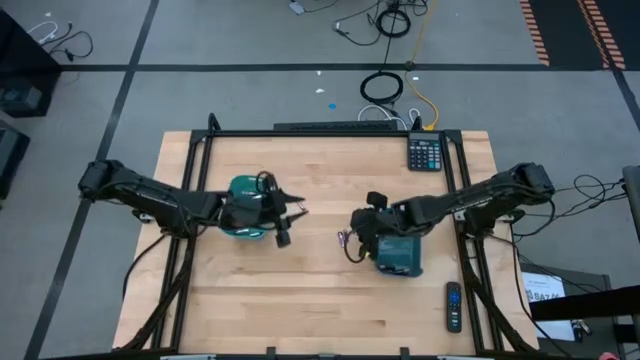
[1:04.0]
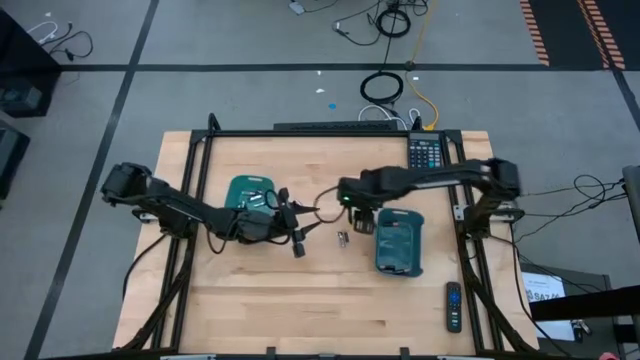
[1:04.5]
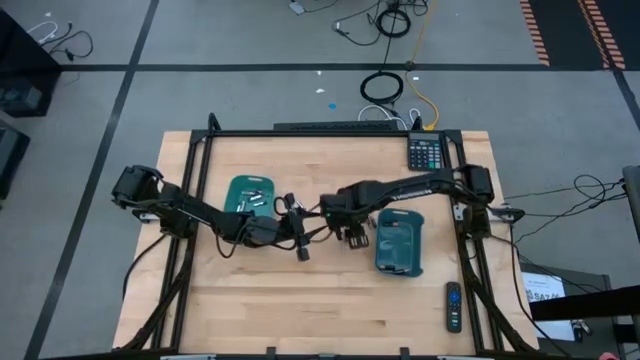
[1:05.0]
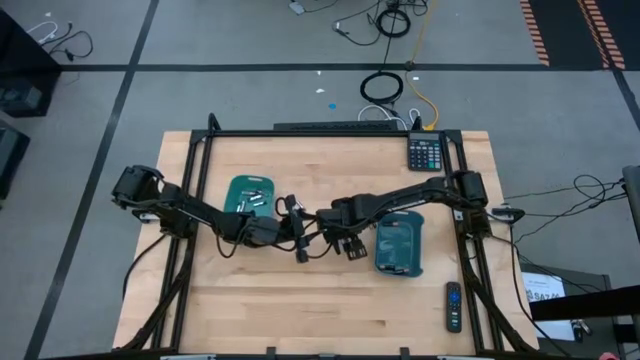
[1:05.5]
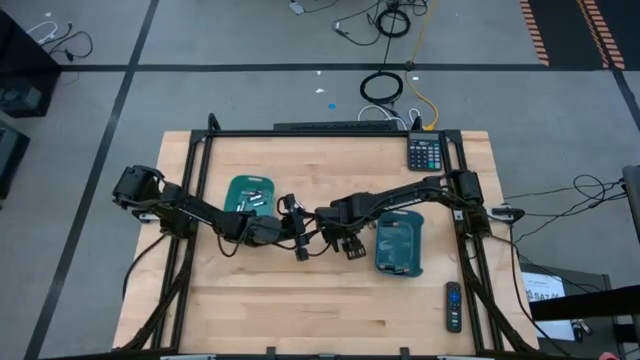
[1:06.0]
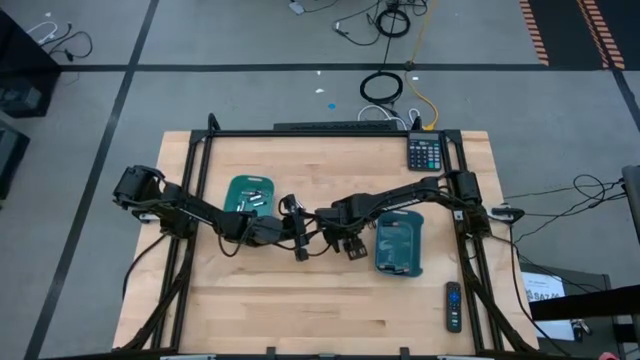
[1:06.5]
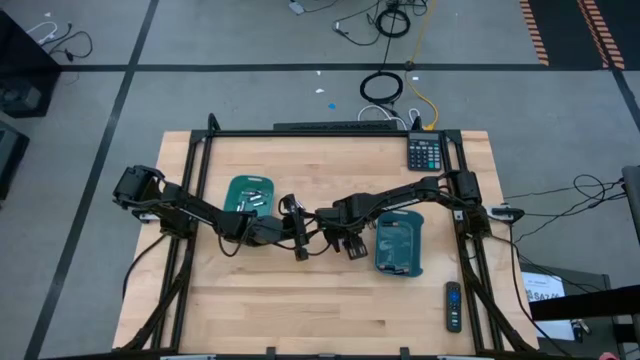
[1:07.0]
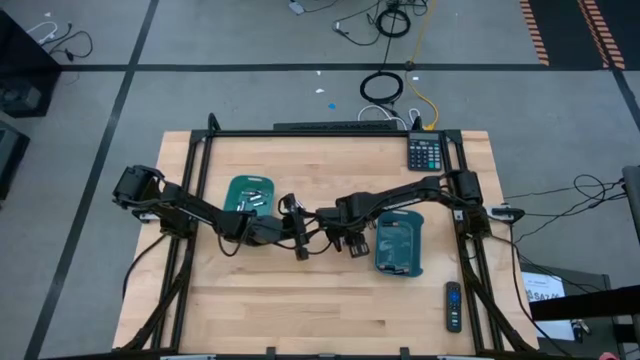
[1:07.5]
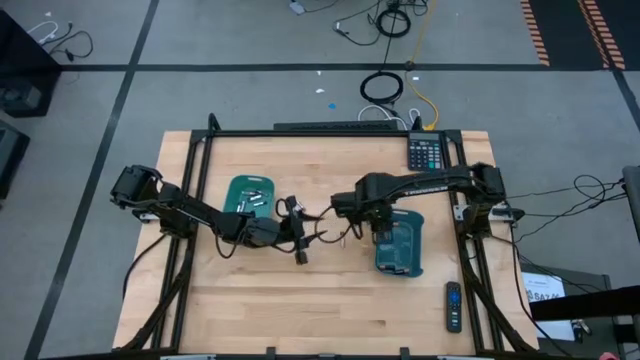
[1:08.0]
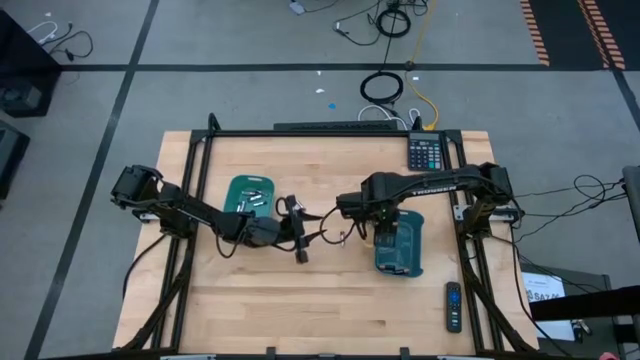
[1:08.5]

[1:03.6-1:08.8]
Task: Sort batteries
Put the black battery into the blue bin

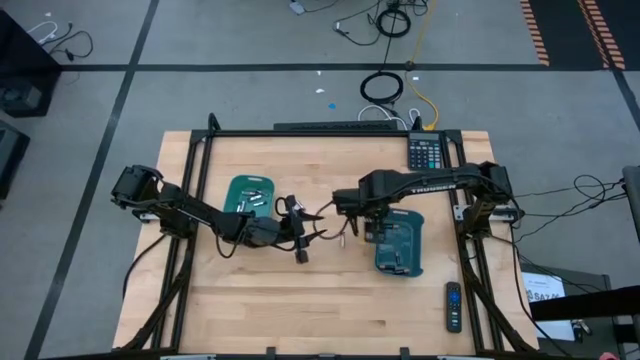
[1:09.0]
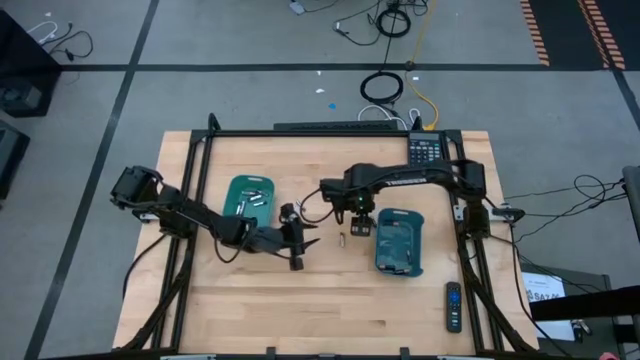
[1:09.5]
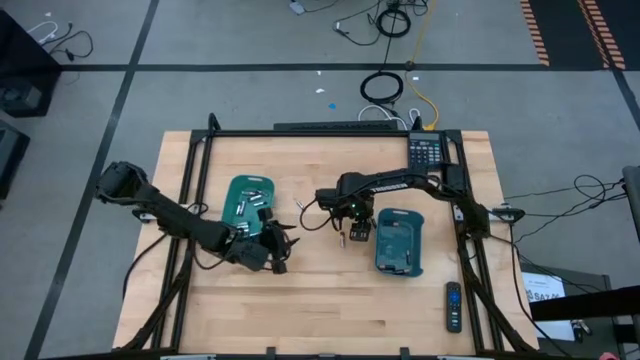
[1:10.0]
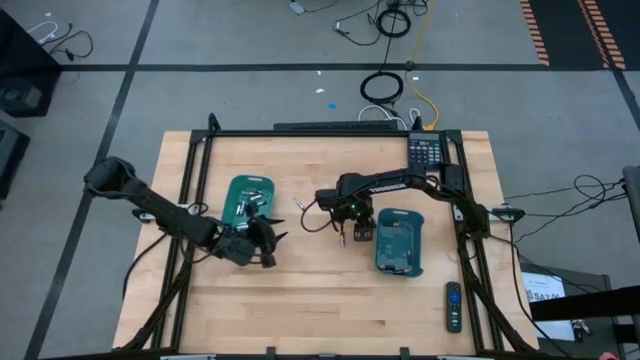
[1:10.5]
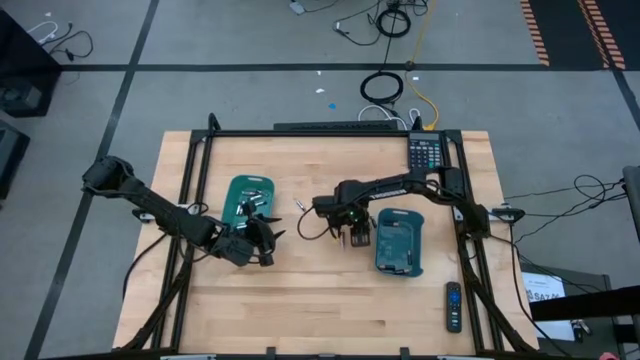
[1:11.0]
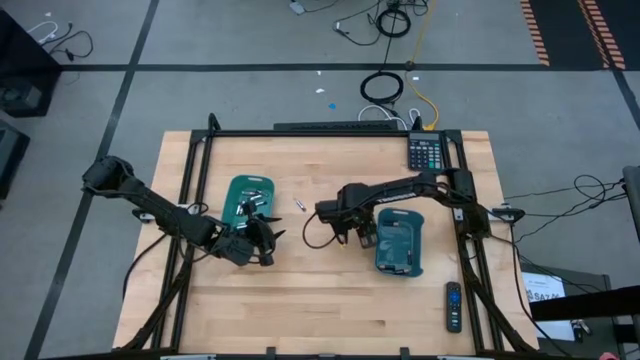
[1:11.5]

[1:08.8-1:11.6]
Put the black battery into the blue bin

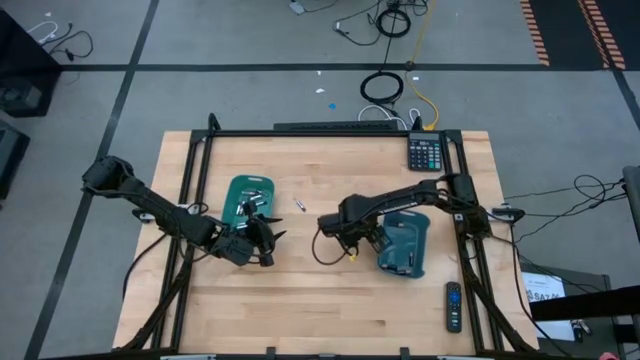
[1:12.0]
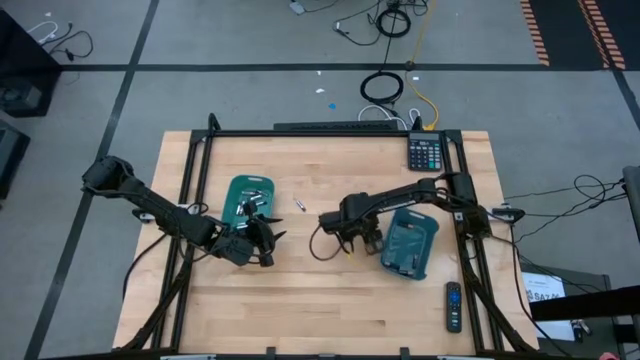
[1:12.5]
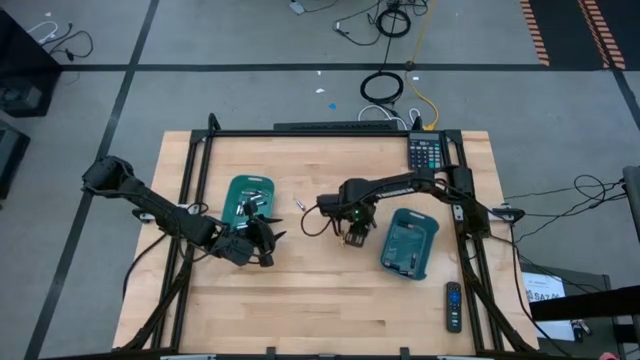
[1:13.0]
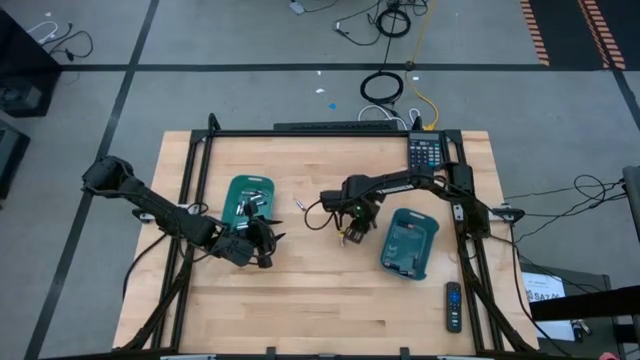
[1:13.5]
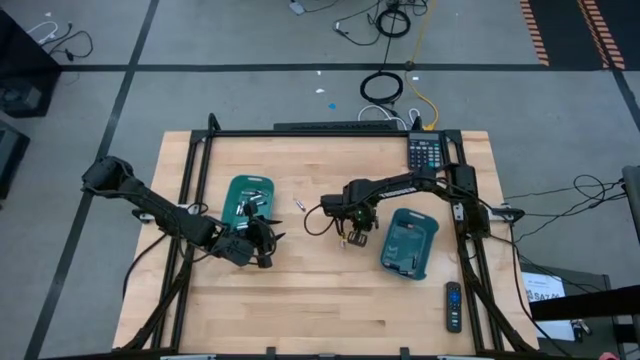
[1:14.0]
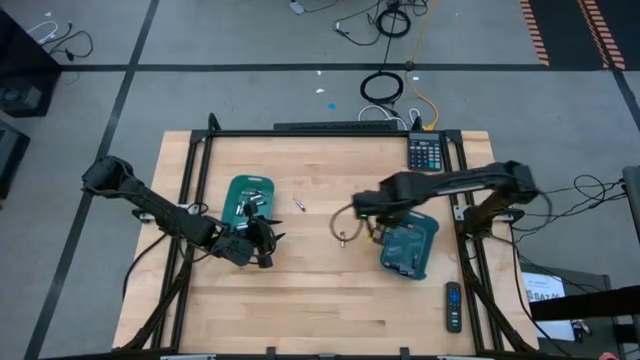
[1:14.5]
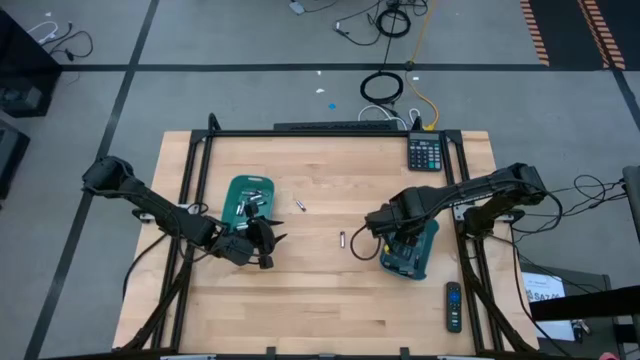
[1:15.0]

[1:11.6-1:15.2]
Put the black battery into the blue bin

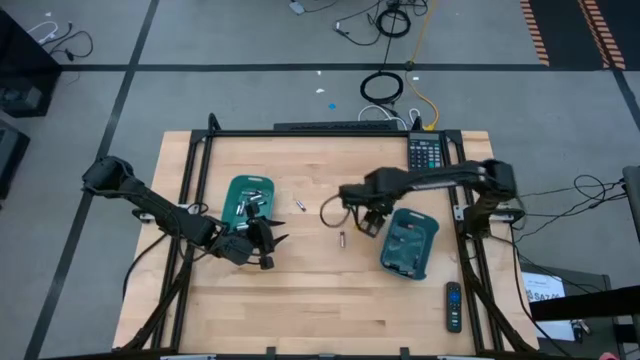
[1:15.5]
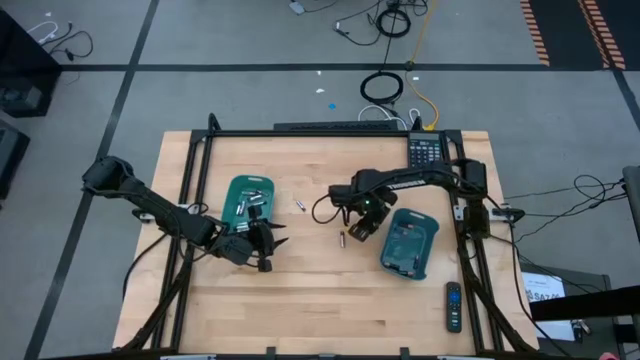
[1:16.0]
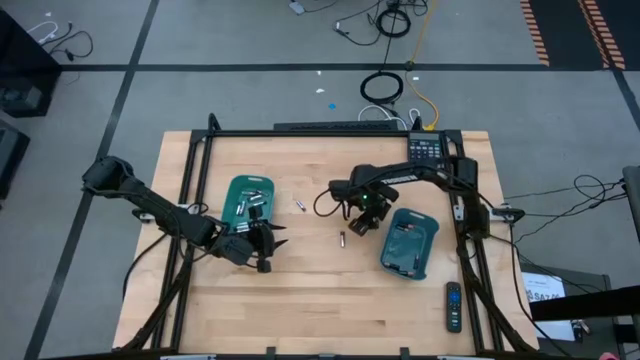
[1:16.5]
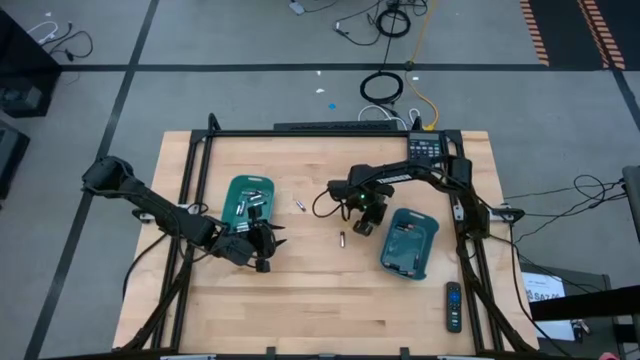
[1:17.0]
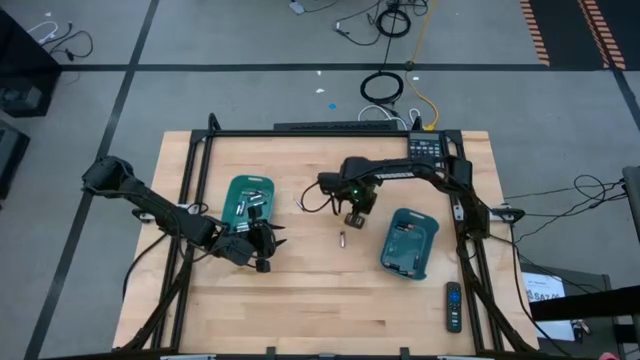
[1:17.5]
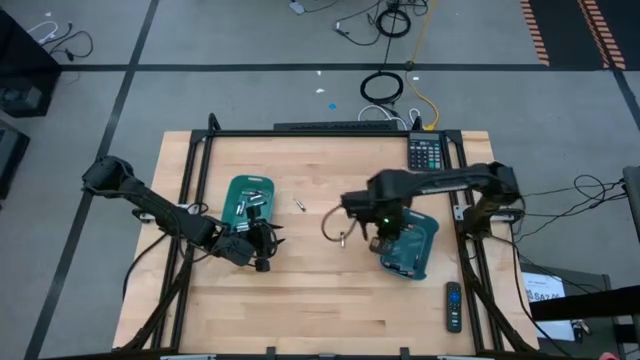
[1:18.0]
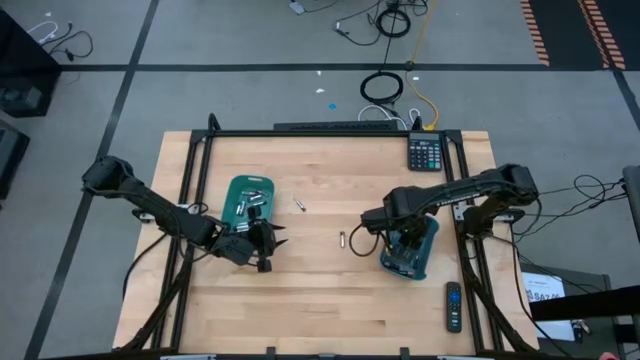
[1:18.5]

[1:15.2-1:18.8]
Put the black battery into the blue bin

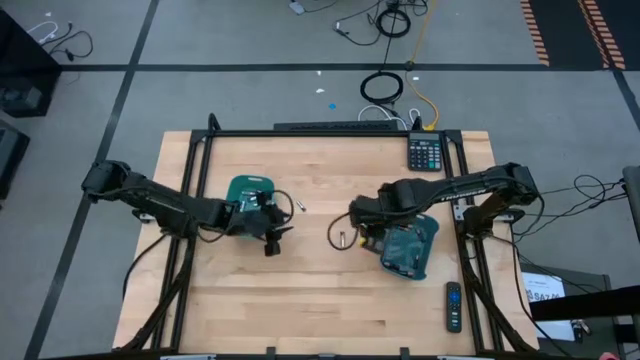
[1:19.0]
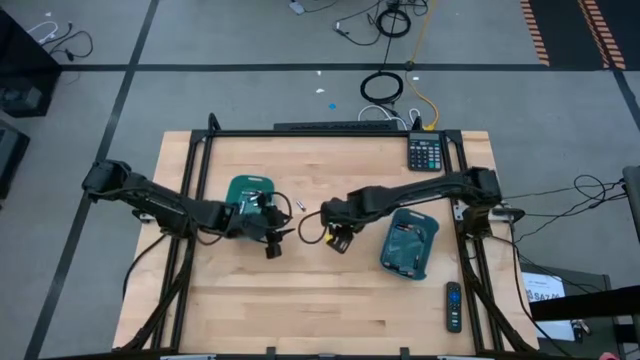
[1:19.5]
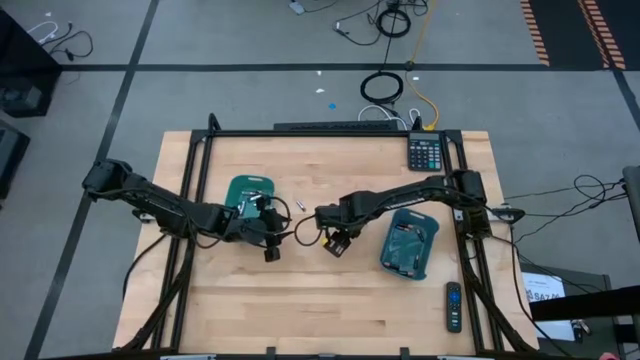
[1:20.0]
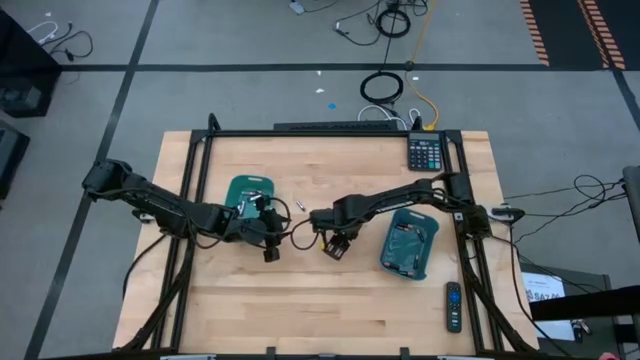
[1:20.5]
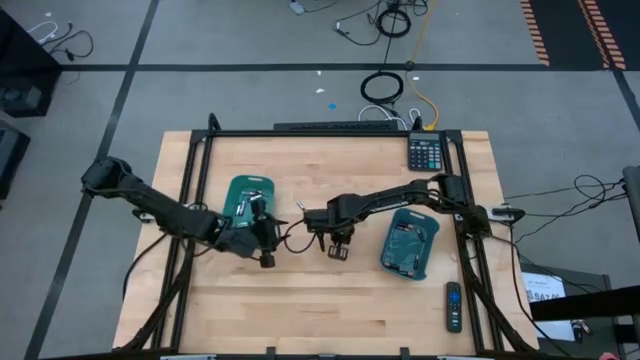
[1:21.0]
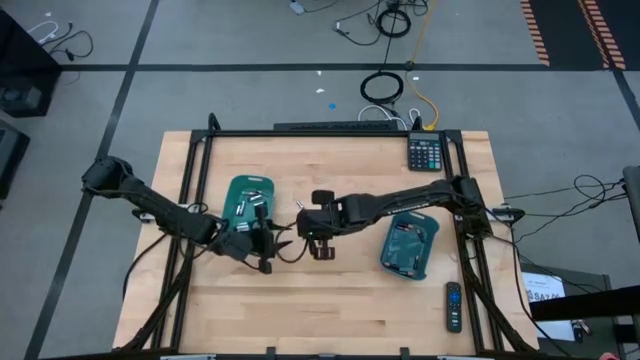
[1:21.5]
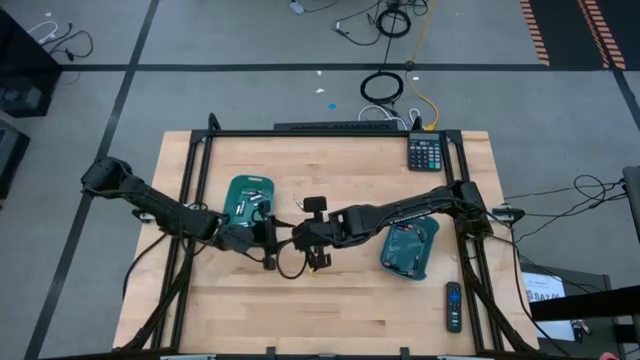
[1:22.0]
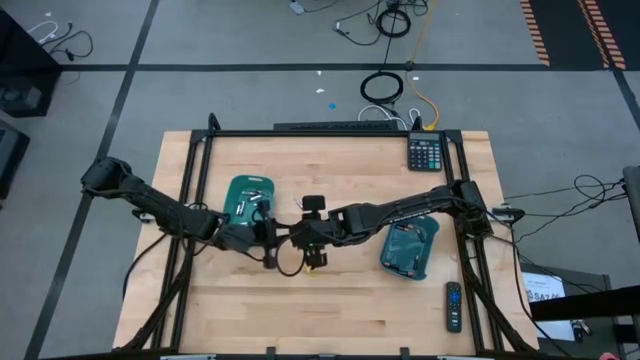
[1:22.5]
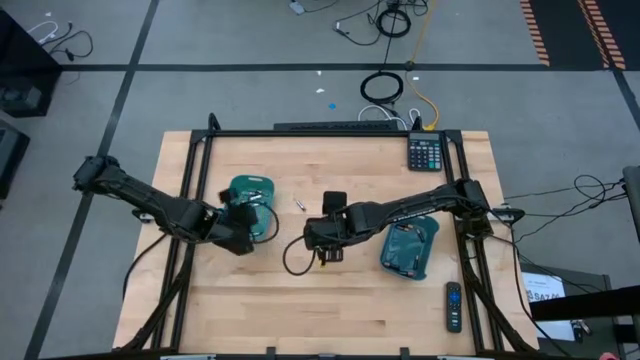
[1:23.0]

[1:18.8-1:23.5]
Put the silver battery into the green bin

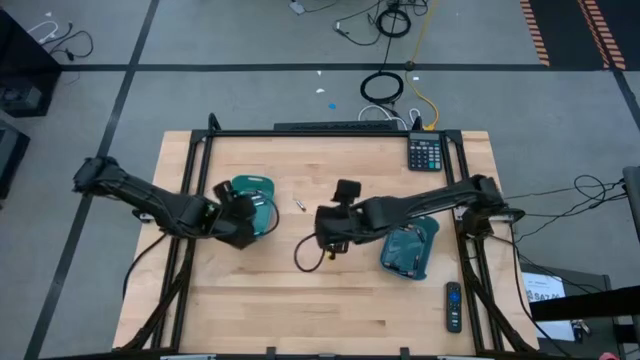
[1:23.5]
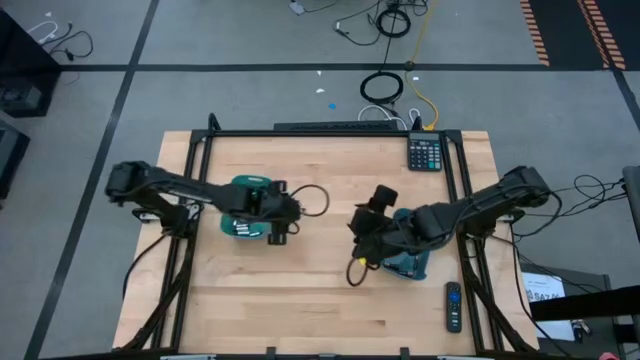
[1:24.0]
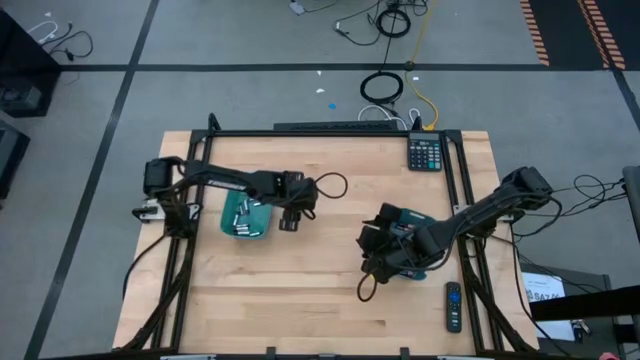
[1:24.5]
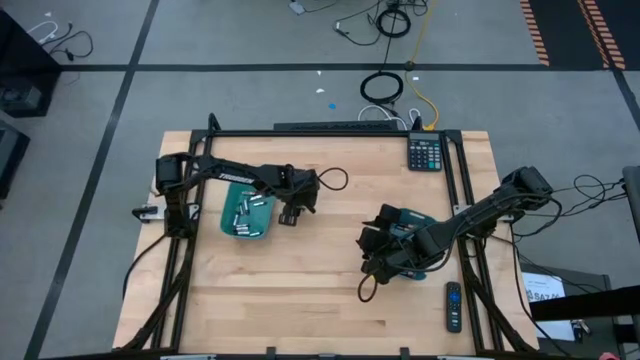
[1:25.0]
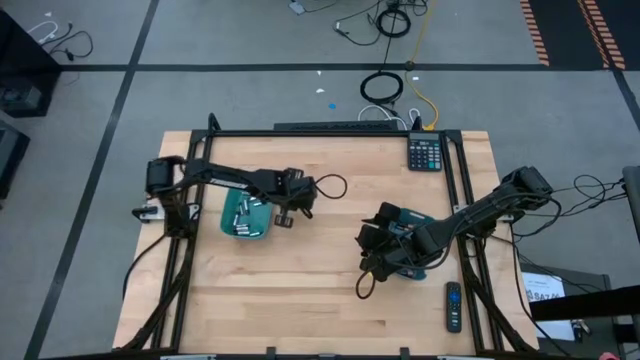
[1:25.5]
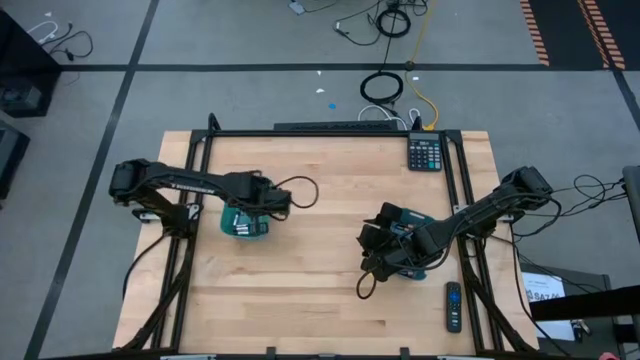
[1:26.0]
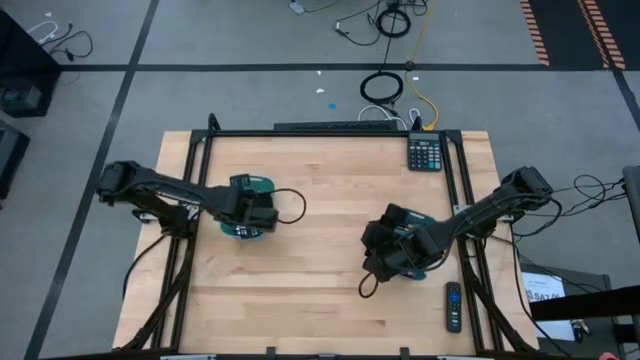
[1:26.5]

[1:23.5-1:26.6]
Put the silver battery into the green bin
